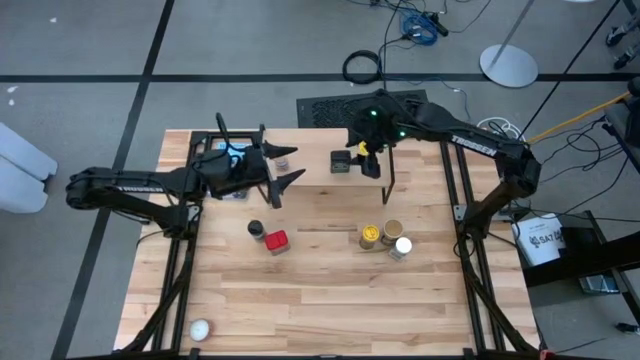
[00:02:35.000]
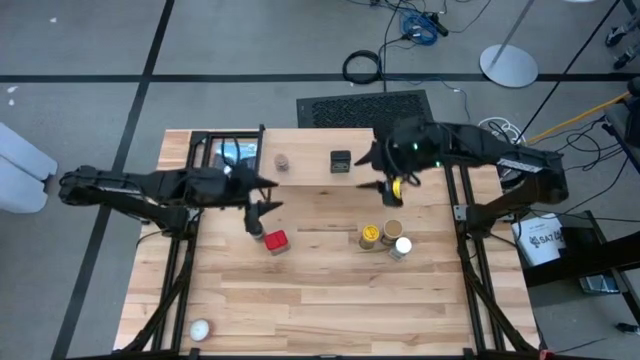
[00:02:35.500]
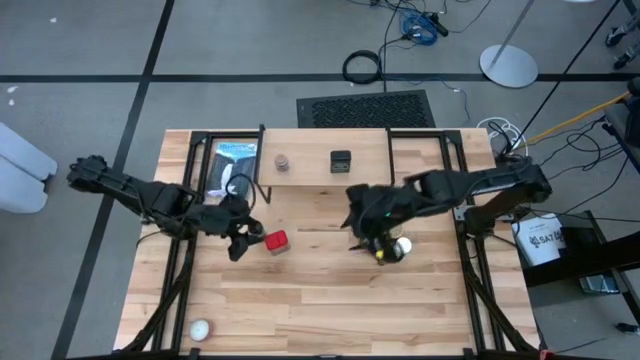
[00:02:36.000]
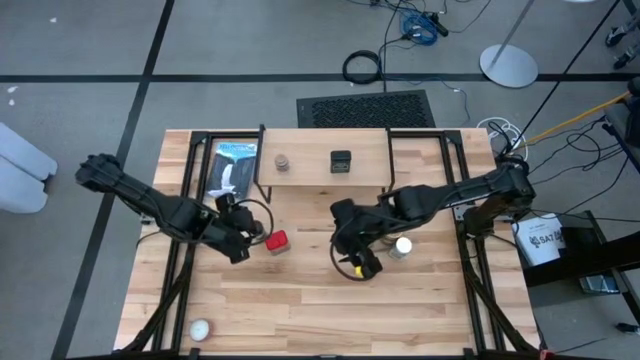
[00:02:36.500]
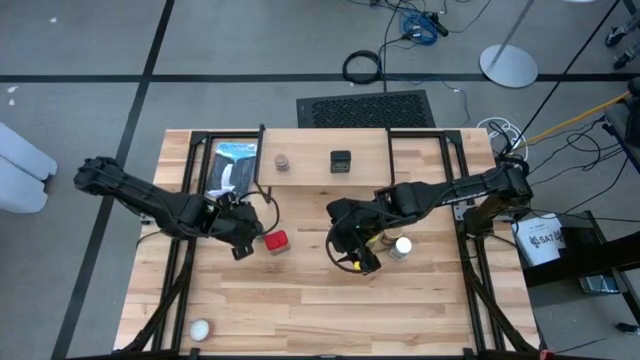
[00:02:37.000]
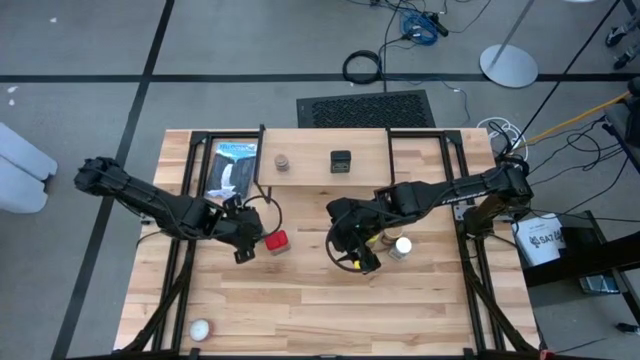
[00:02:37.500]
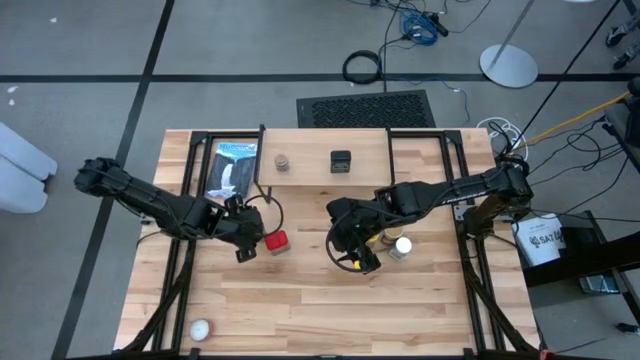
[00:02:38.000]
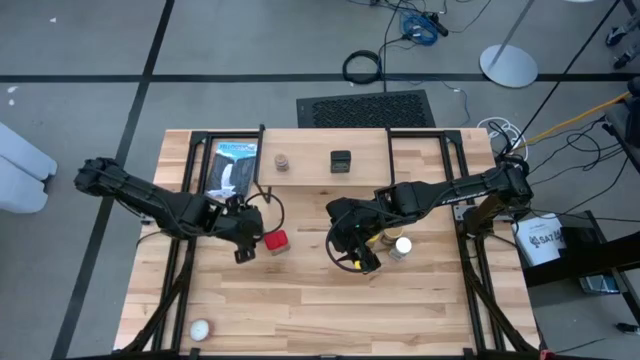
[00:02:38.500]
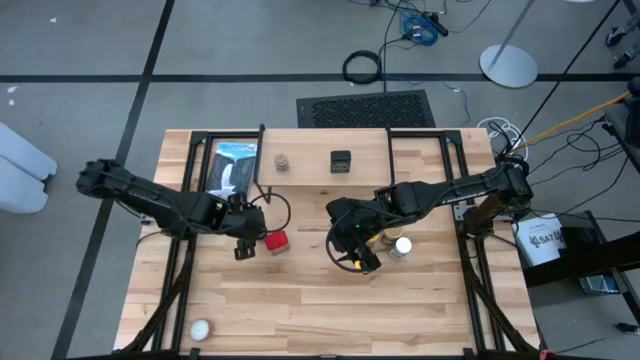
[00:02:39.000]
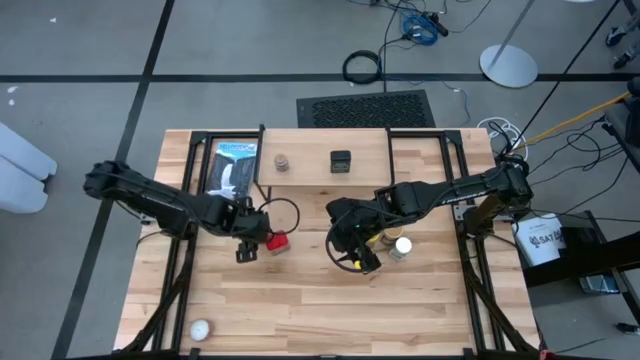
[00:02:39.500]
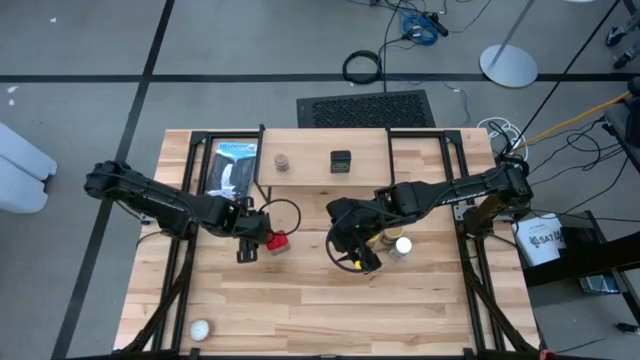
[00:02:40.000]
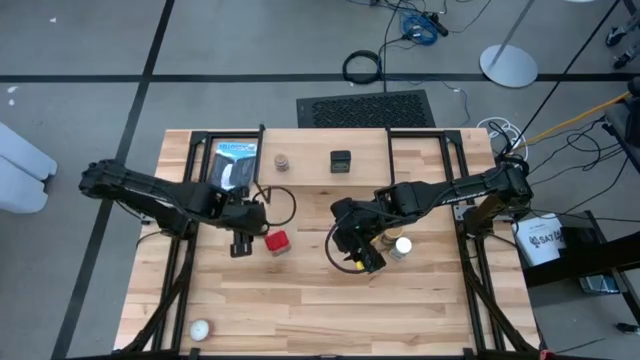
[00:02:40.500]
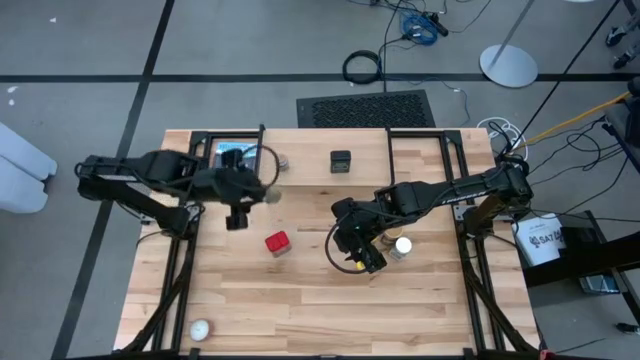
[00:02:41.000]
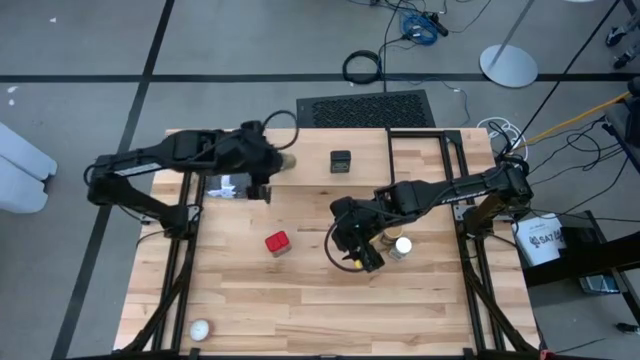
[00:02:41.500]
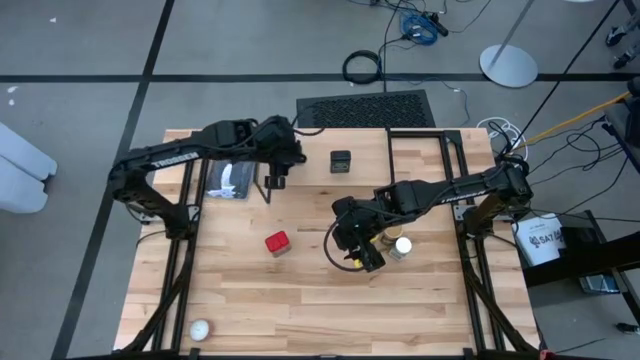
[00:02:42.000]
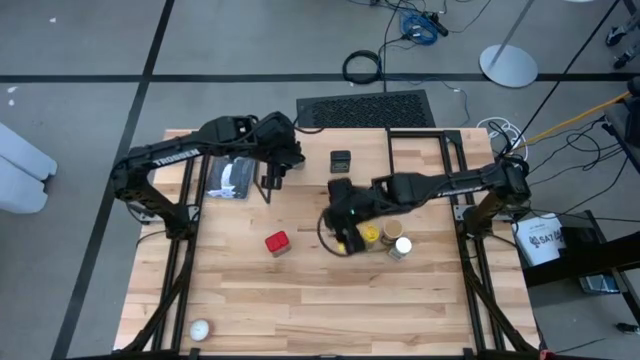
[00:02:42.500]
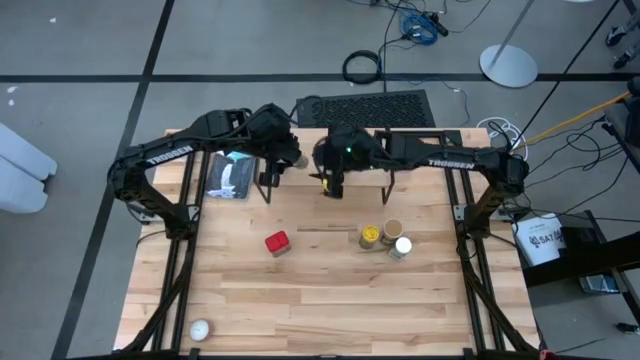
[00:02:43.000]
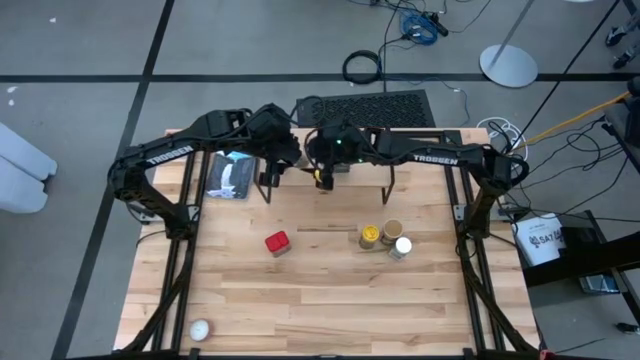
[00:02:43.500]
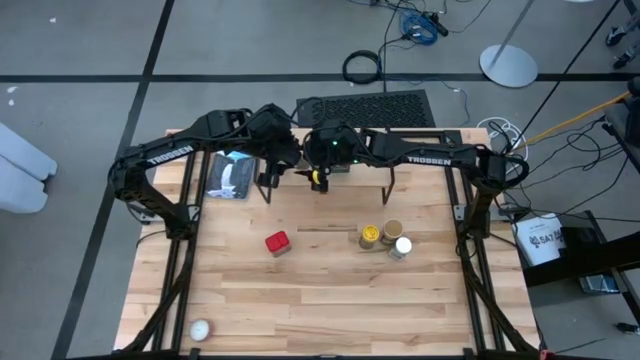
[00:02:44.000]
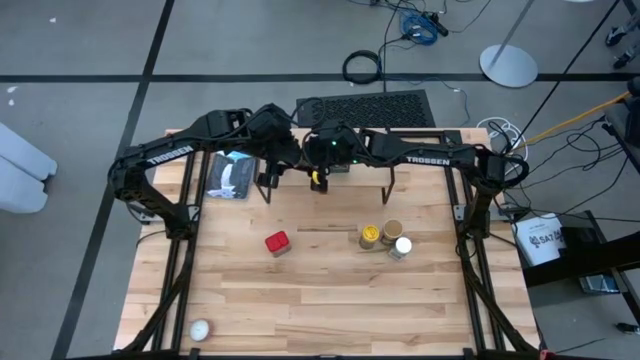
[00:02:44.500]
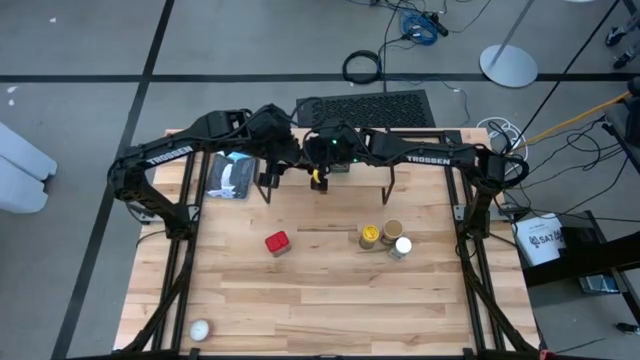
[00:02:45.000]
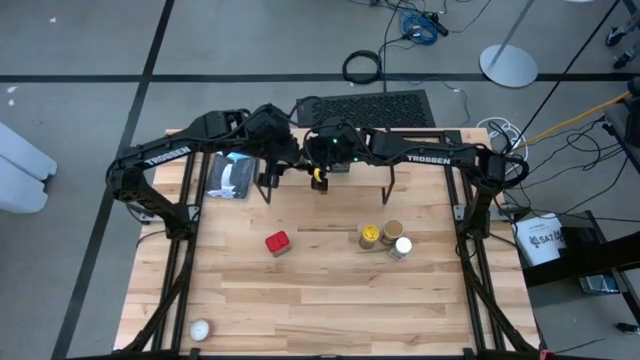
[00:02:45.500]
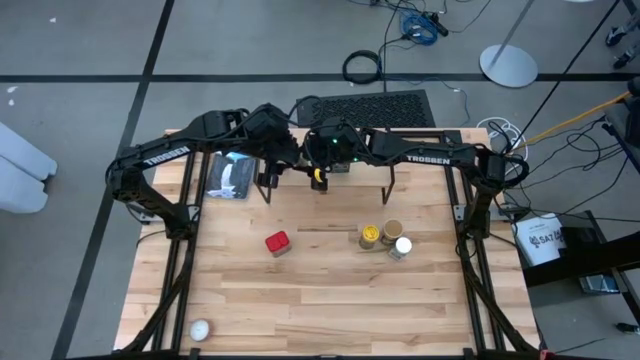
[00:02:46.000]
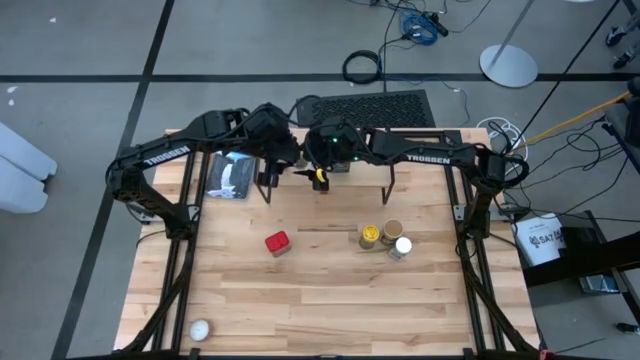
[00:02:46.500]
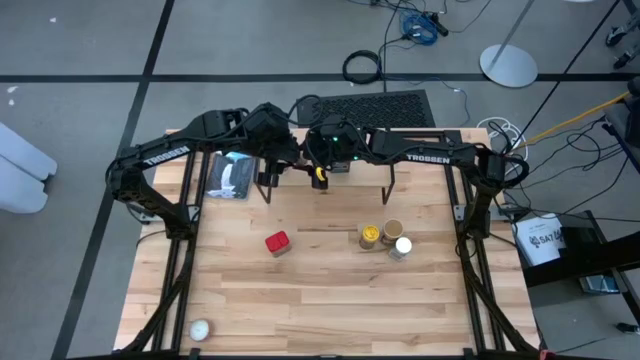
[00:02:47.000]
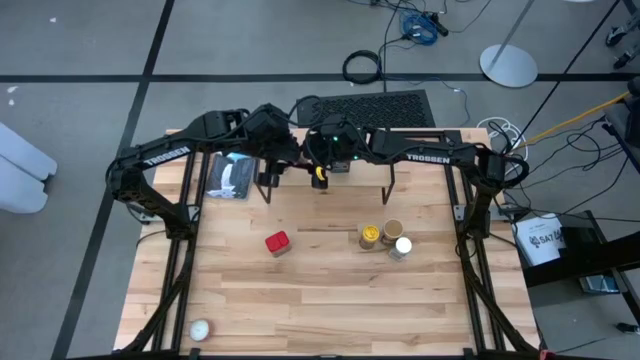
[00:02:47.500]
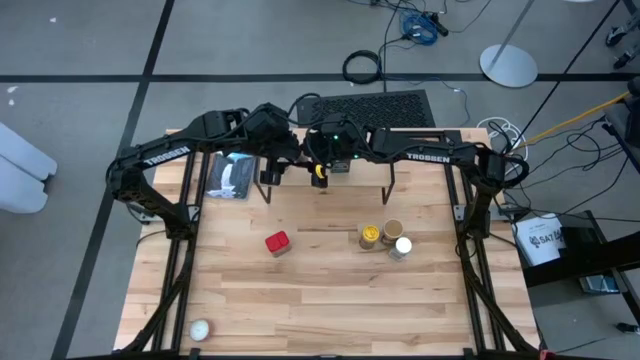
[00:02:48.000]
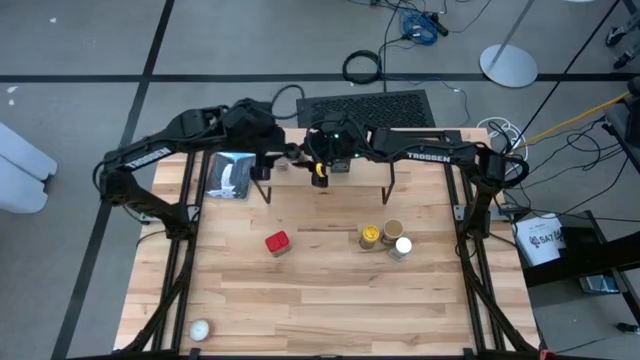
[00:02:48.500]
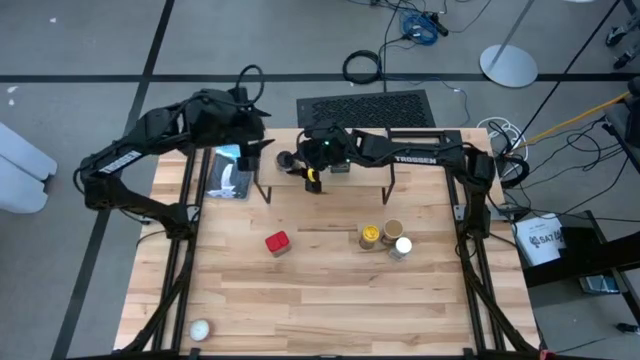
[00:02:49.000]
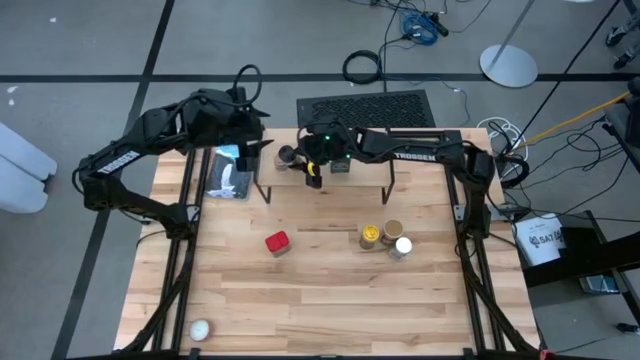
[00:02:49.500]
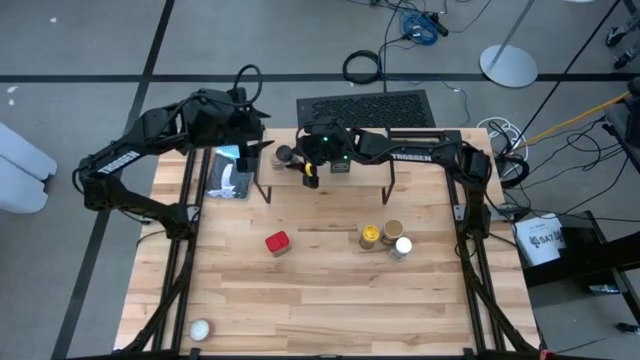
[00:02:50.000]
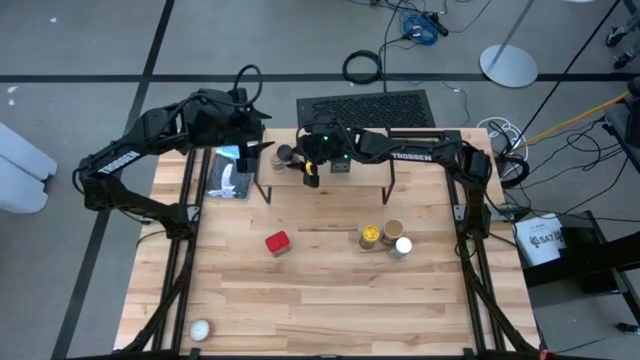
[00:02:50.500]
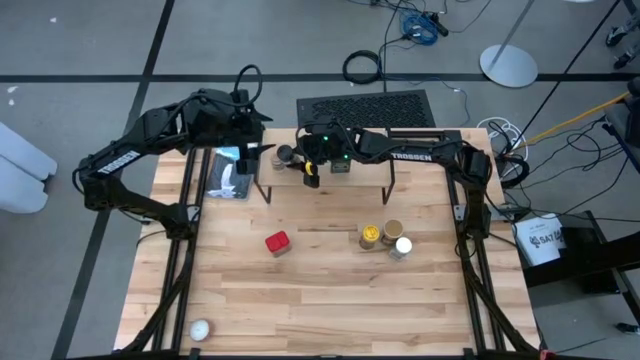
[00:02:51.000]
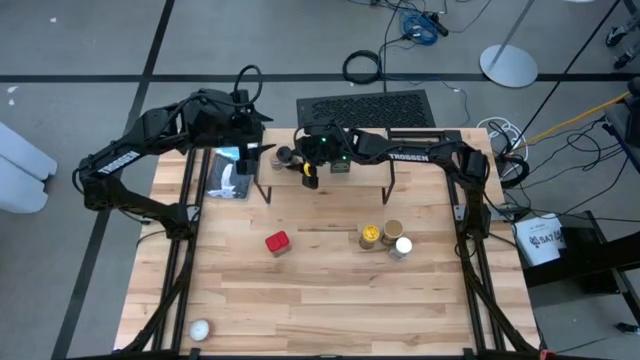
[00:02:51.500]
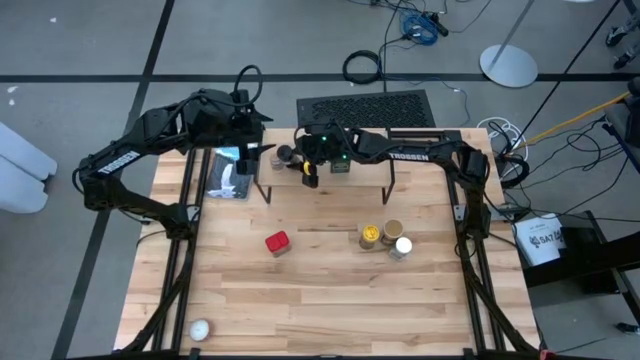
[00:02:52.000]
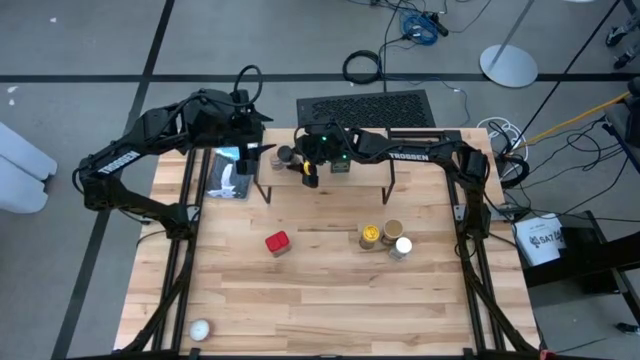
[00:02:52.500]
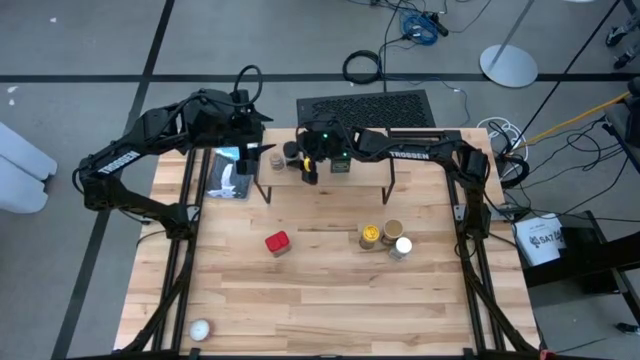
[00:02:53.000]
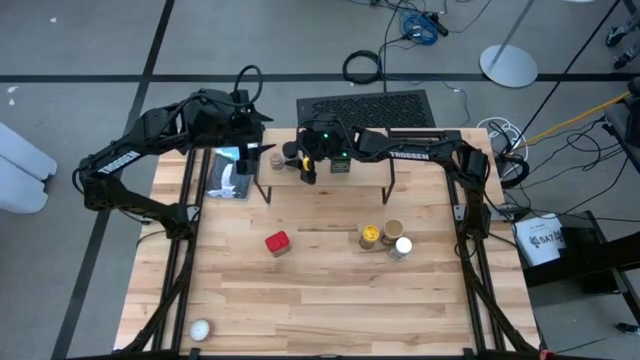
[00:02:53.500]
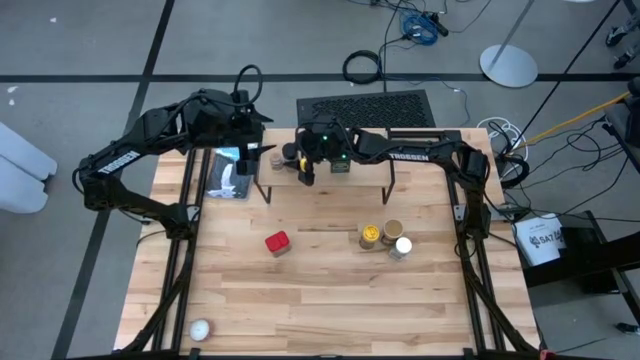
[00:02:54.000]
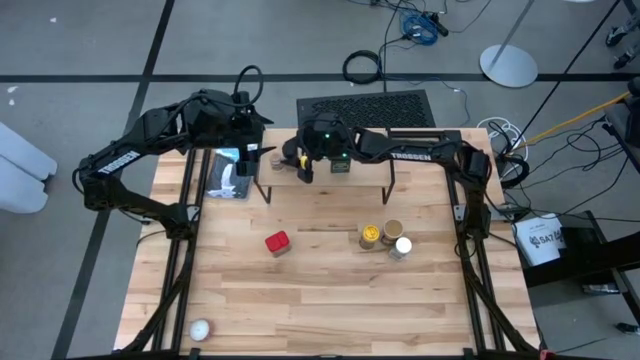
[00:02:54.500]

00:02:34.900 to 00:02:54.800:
Task: Shelf spices
Put the black seasoning bottle on the shelf

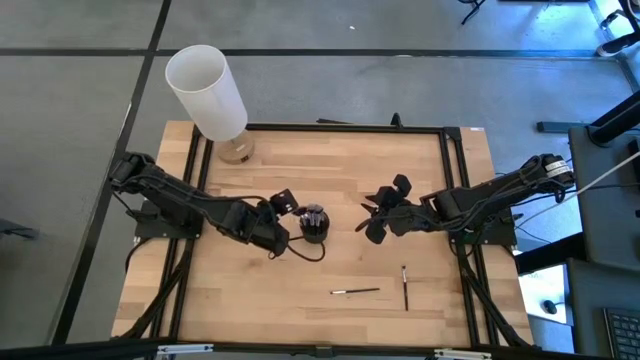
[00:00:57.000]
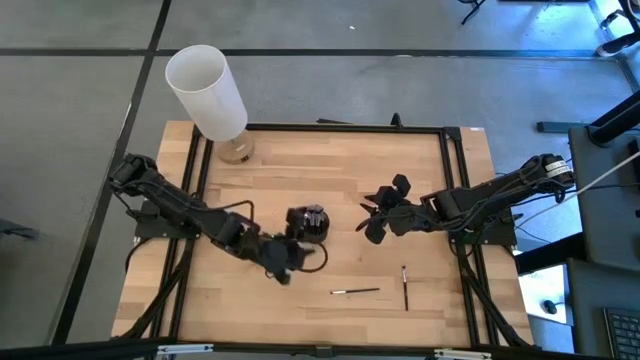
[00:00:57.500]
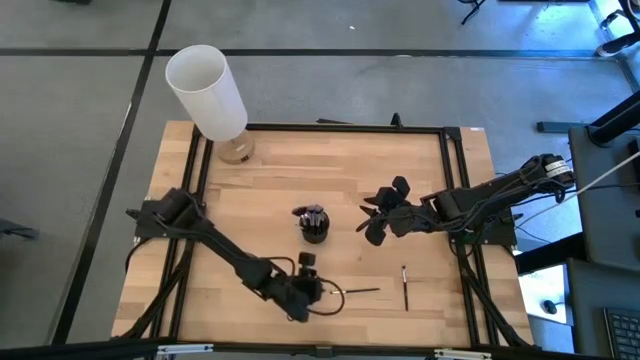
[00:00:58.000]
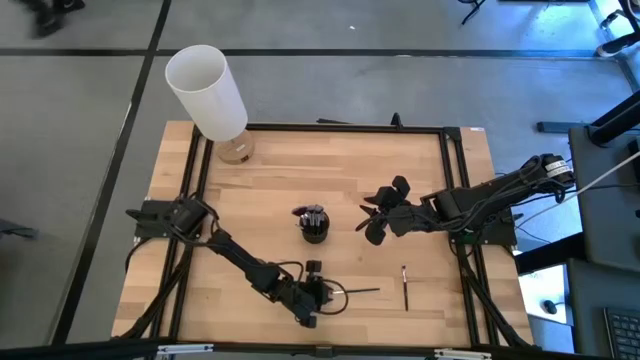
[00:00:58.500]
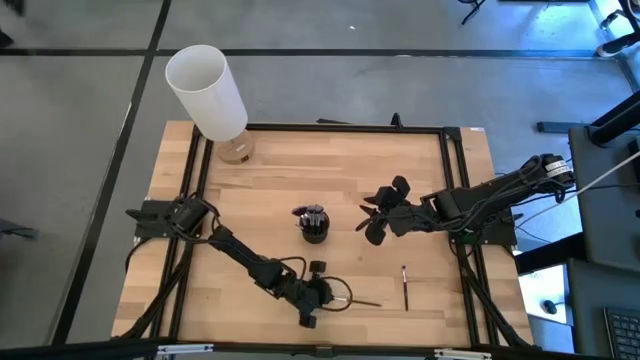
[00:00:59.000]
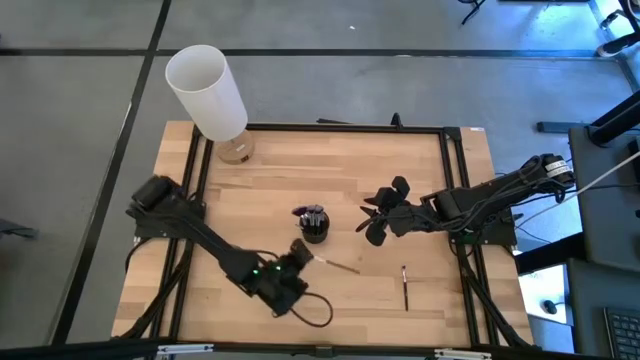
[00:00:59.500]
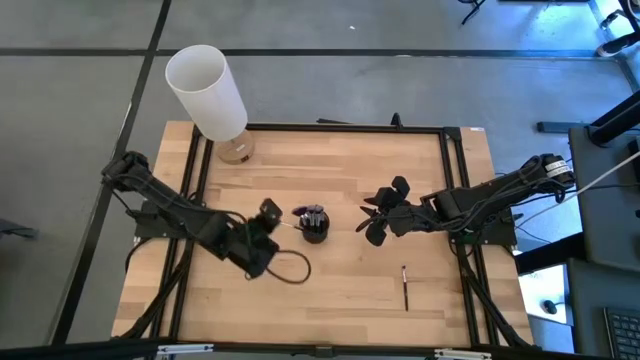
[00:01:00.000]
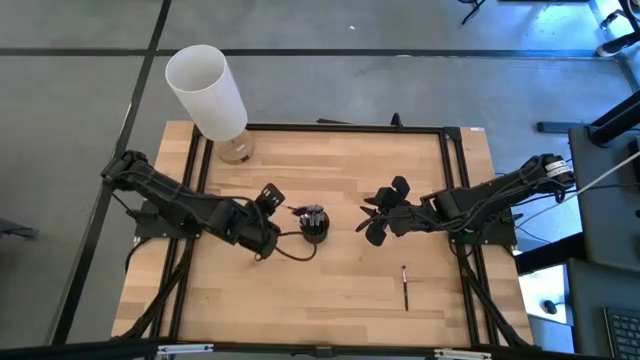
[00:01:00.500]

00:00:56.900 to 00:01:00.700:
Task: Sort items
Put the silver eyeshadow brush into the pen holder
